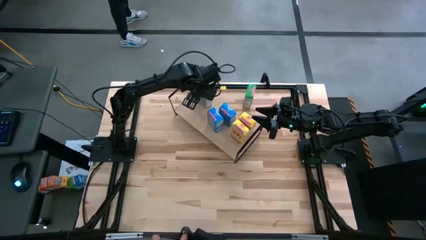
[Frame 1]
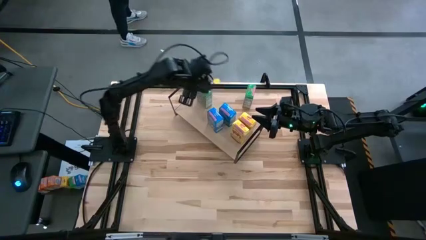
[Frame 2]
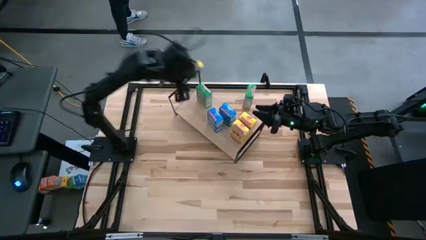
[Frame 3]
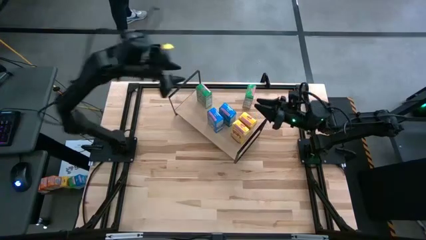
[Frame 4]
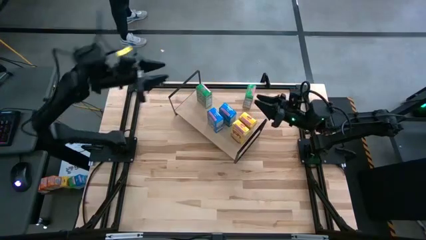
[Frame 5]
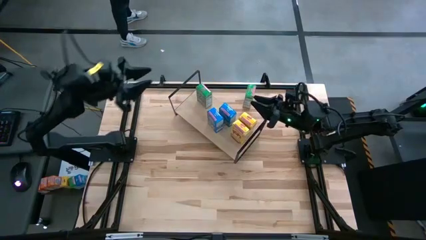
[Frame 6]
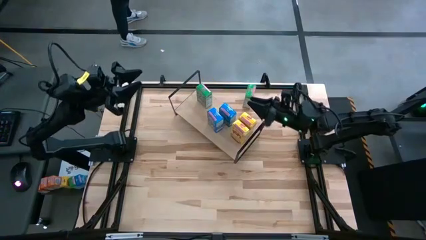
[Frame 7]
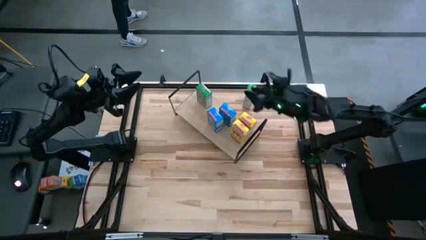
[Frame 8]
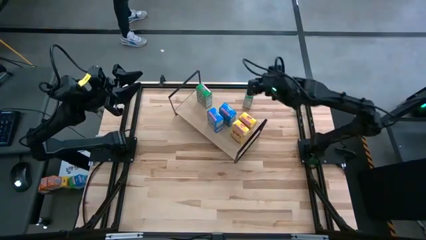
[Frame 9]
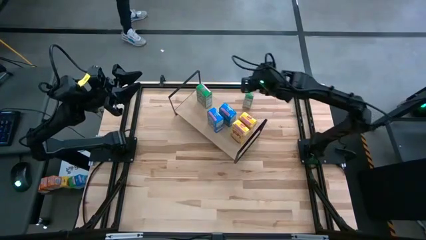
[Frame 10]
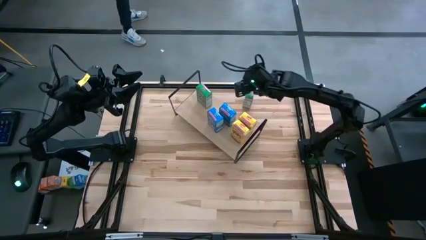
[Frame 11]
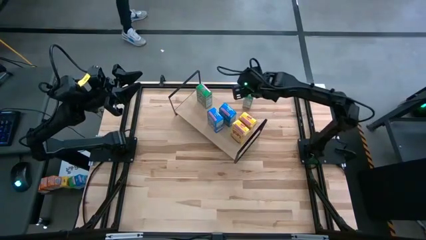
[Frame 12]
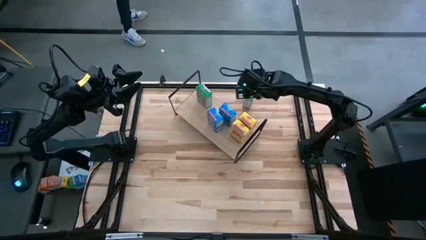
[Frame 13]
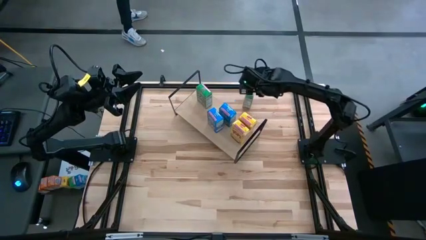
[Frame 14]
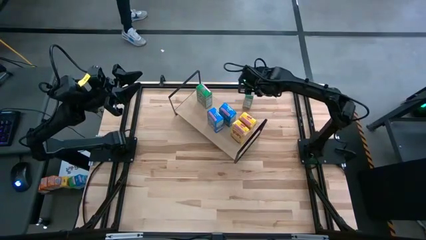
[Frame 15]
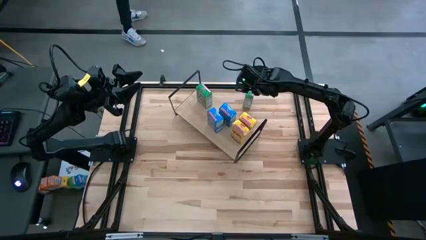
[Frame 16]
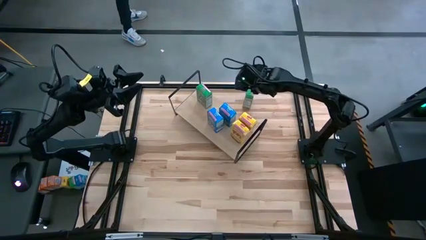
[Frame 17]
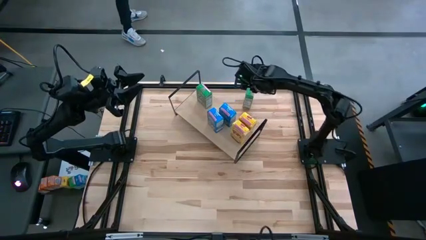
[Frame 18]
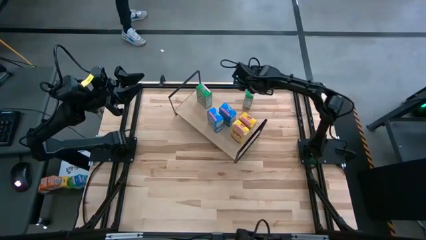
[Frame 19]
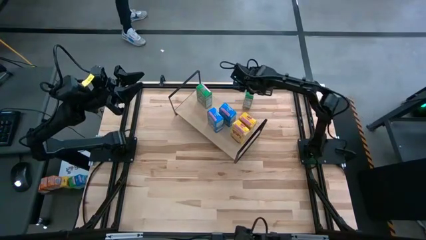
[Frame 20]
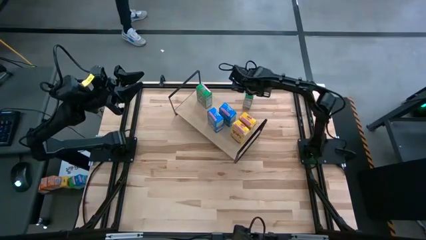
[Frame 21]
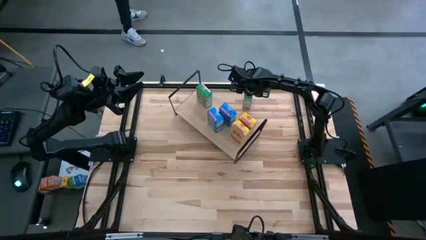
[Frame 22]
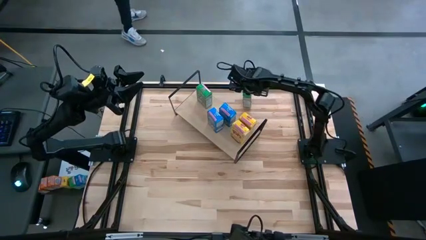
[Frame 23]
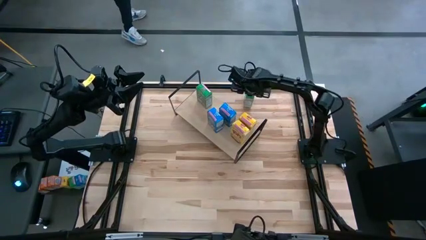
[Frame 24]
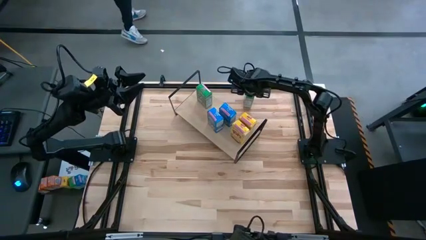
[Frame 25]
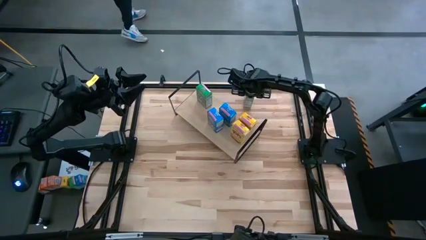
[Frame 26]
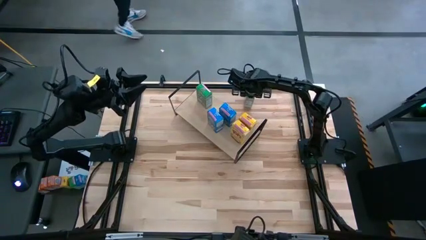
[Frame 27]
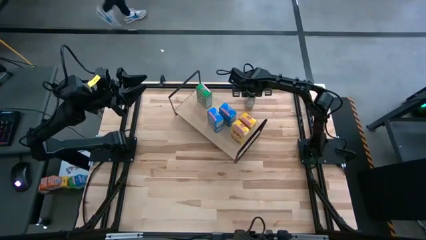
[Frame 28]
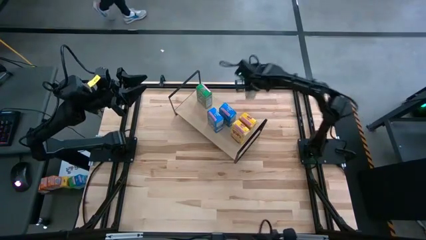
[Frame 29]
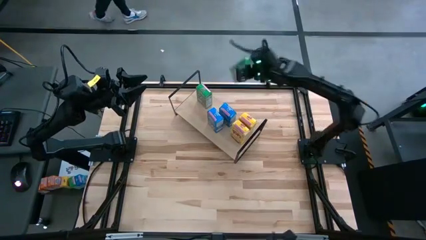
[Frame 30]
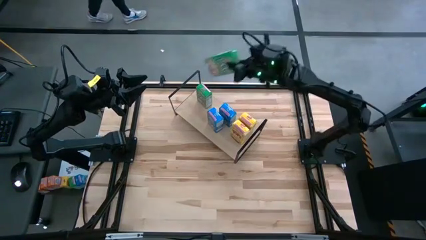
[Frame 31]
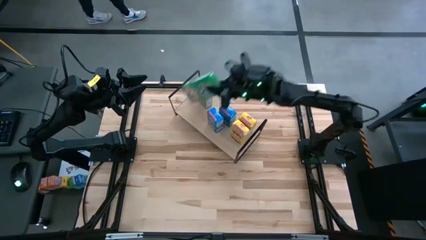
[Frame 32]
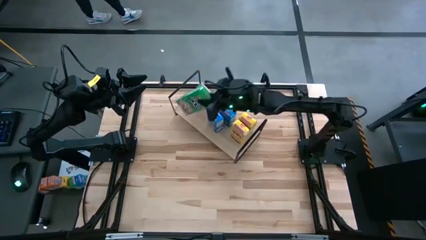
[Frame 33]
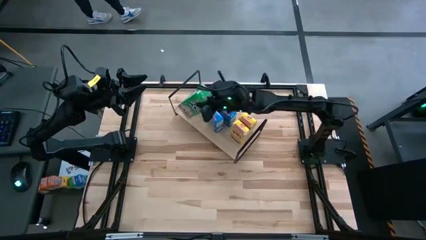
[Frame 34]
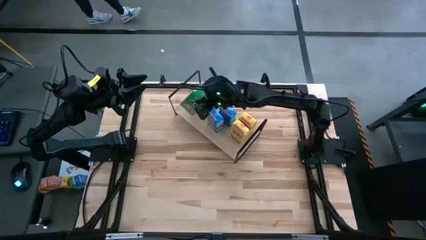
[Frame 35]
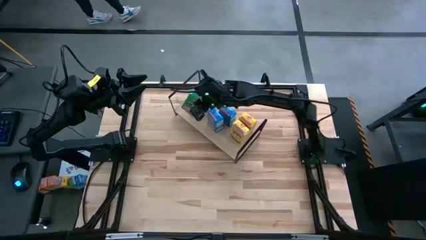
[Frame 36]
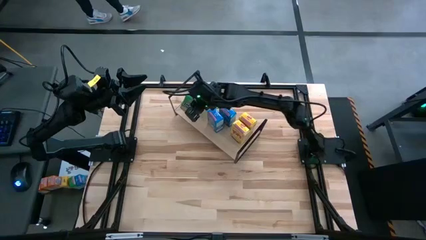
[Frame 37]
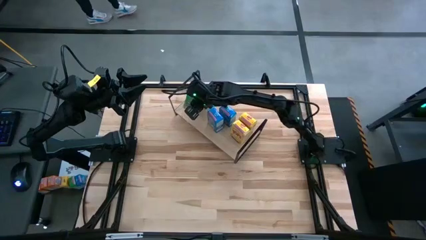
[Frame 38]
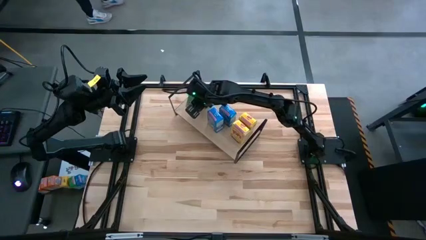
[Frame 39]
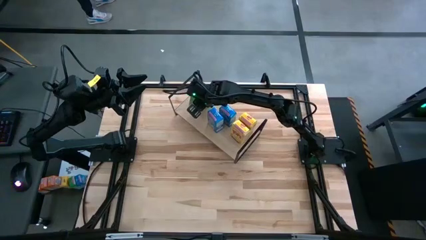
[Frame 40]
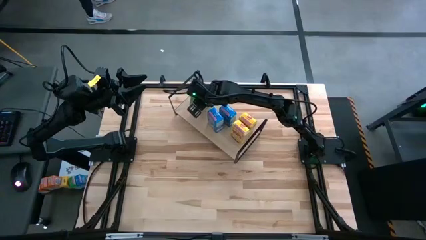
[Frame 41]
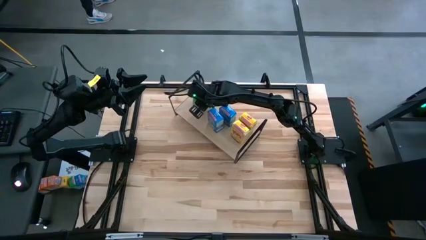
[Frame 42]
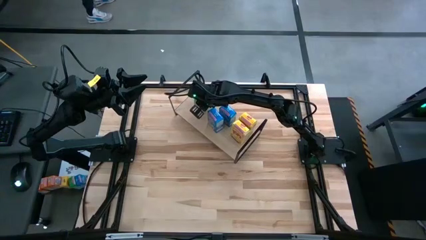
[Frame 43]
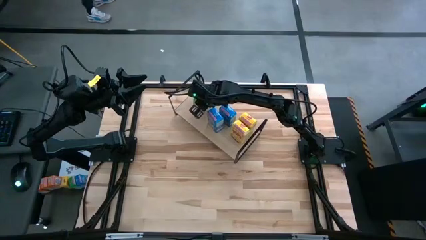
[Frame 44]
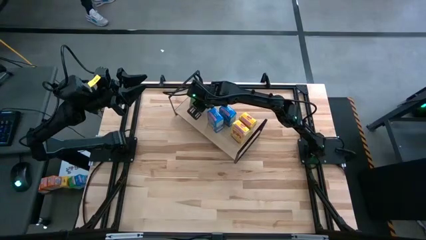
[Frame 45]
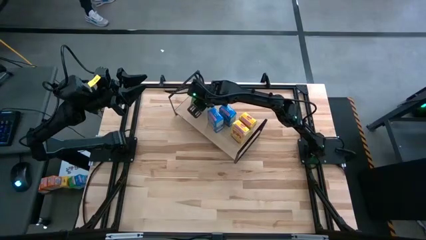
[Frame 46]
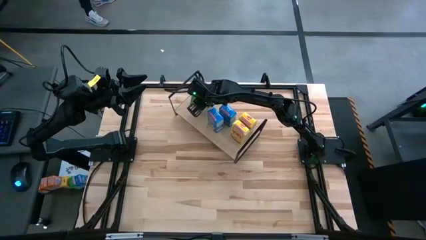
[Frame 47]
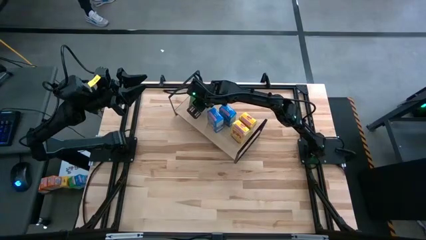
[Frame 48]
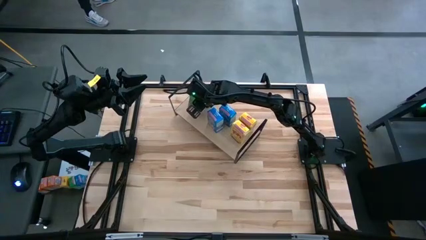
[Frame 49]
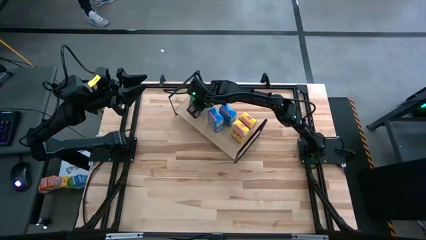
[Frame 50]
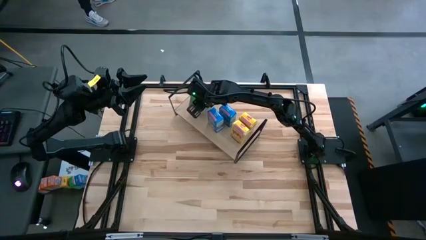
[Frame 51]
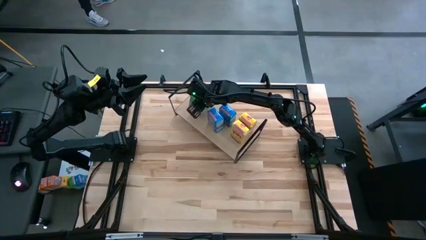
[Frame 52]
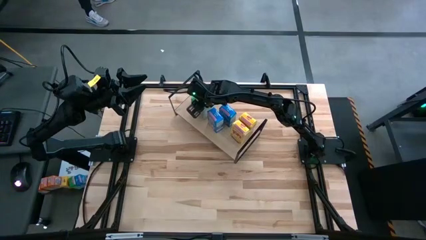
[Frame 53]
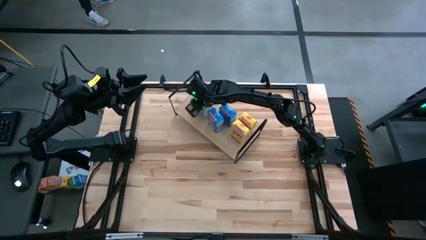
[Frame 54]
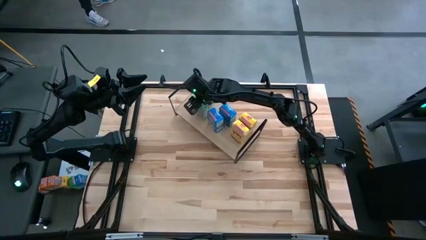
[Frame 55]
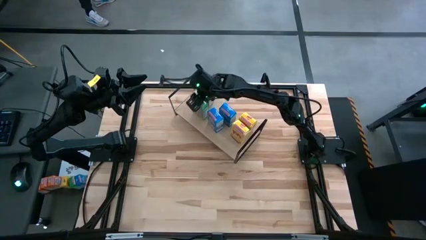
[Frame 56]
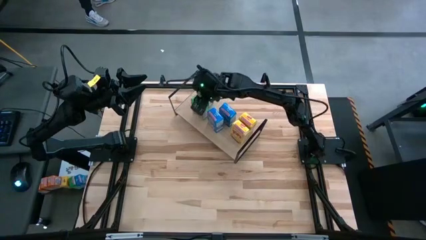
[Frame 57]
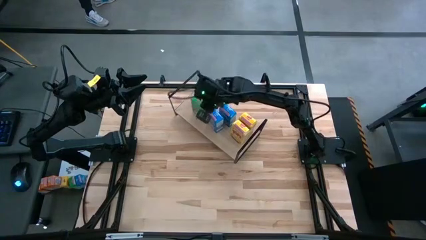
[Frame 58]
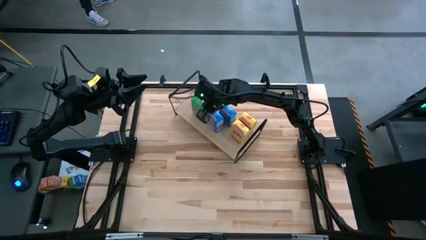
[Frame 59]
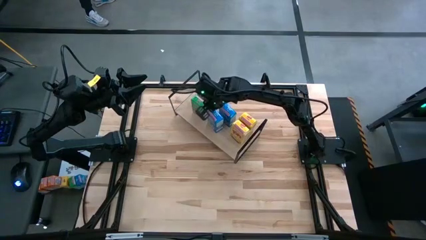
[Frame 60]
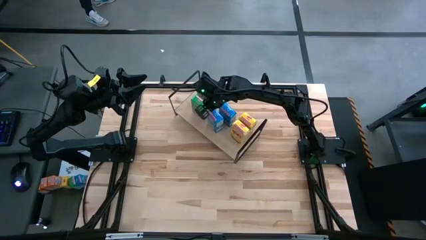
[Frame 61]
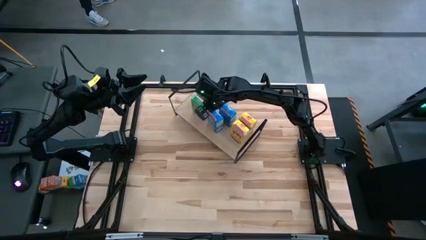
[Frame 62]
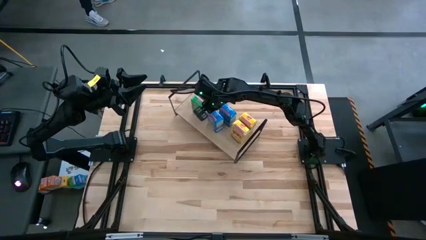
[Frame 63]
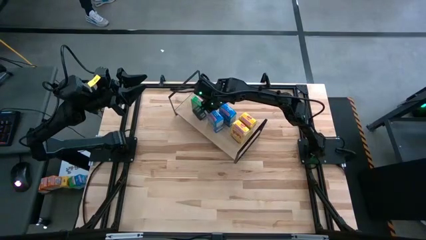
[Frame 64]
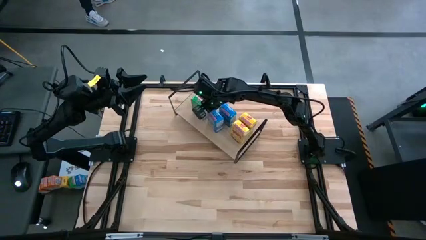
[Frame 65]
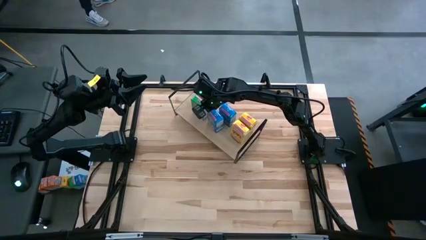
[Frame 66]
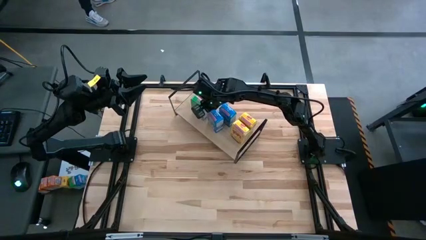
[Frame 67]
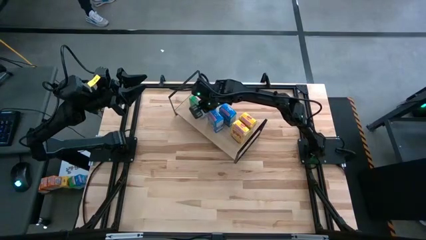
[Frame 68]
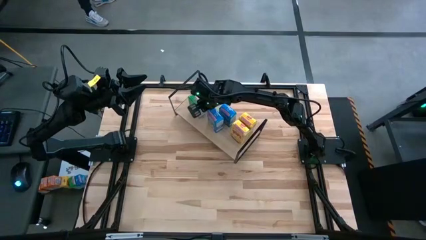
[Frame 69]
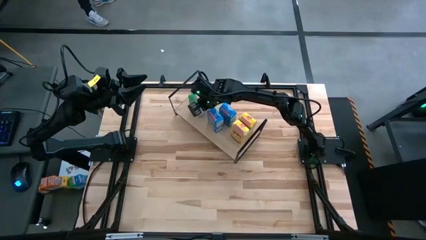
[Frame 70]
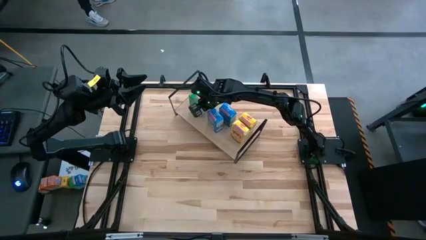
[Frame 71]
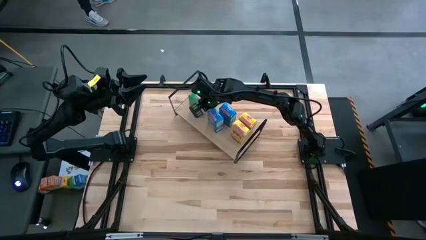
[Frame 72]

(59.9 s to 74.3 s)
Task: Stack cereal on shelf
Put the green cereal box on the shelf aligned with the other green cereal box
